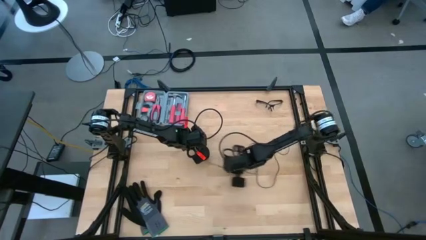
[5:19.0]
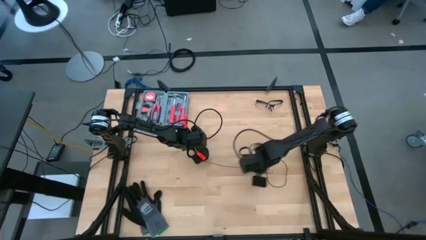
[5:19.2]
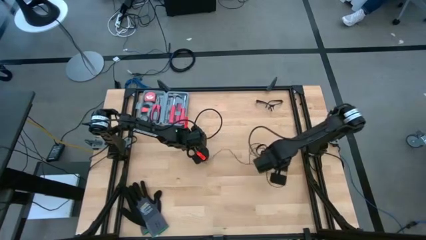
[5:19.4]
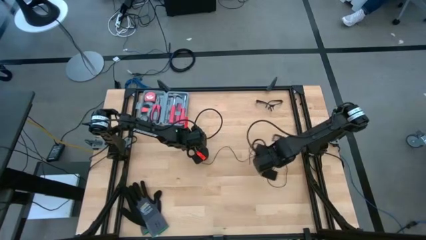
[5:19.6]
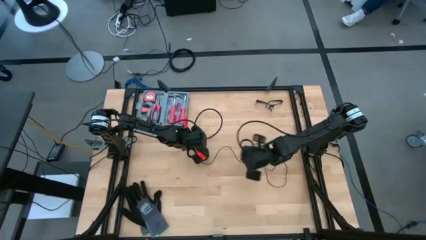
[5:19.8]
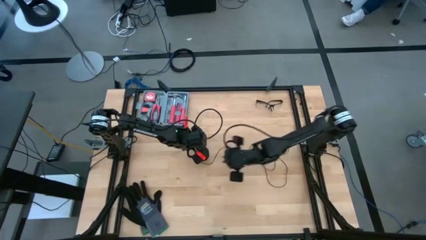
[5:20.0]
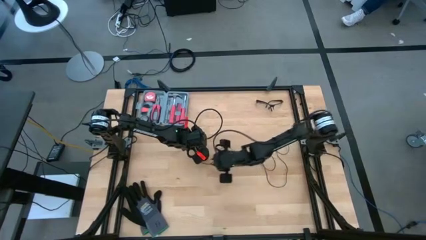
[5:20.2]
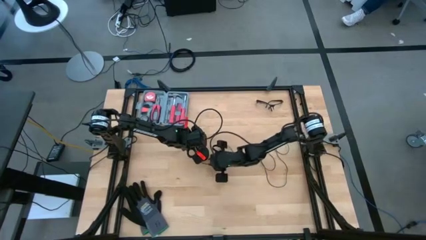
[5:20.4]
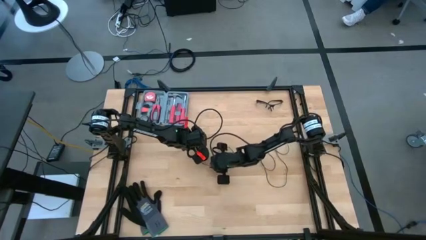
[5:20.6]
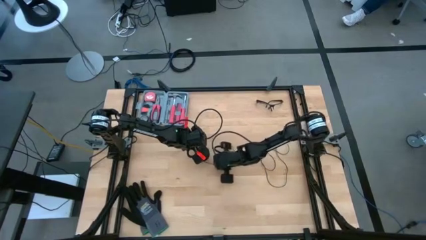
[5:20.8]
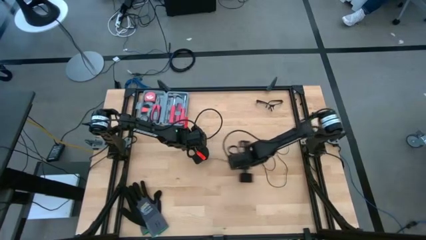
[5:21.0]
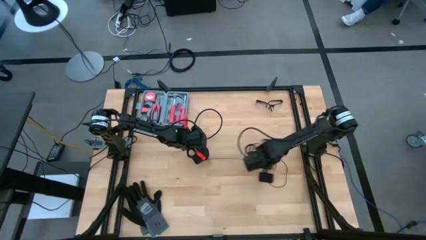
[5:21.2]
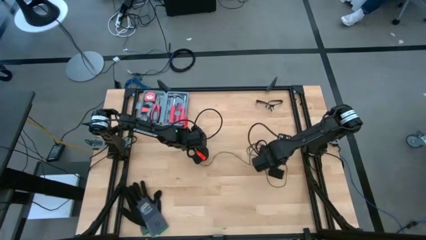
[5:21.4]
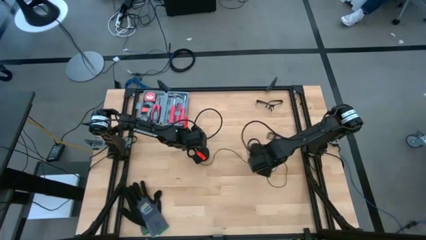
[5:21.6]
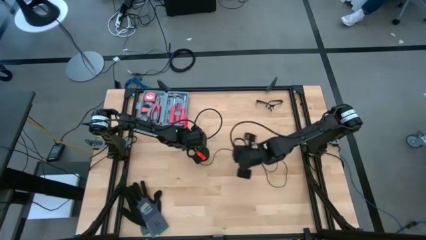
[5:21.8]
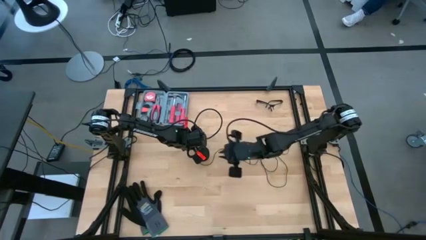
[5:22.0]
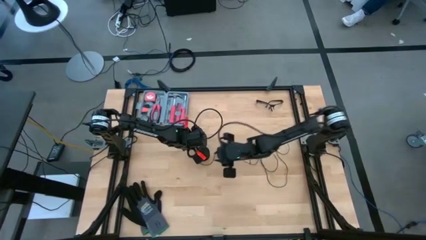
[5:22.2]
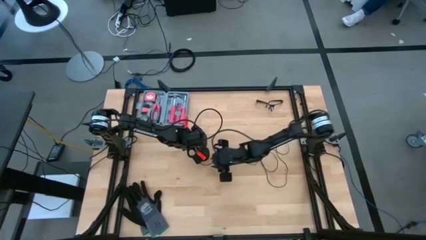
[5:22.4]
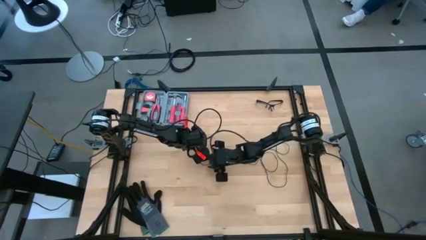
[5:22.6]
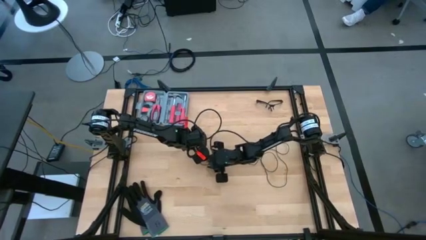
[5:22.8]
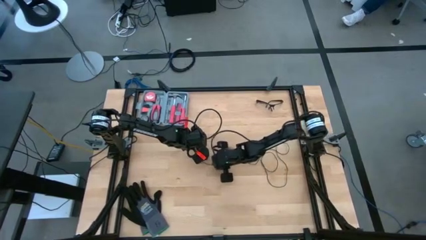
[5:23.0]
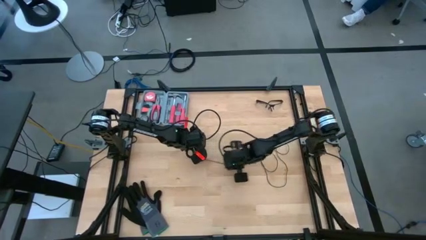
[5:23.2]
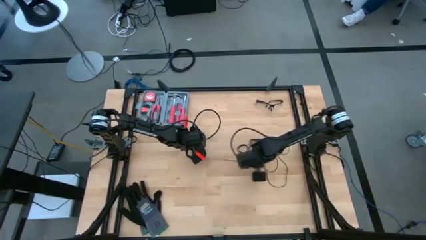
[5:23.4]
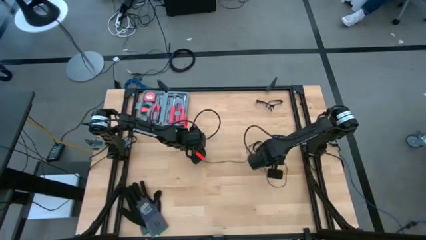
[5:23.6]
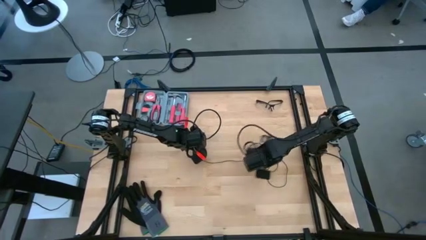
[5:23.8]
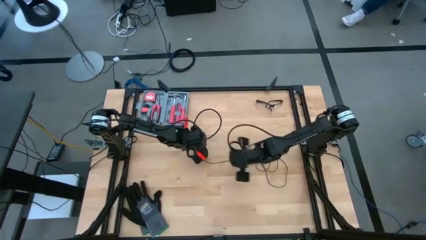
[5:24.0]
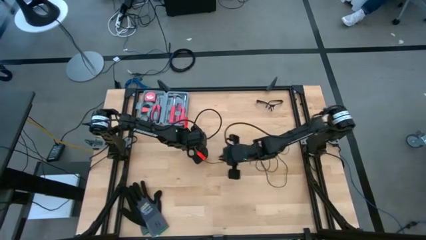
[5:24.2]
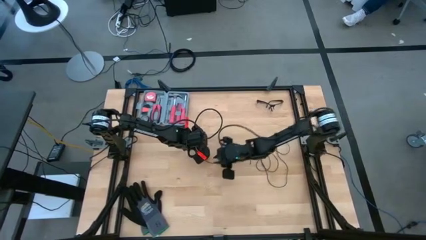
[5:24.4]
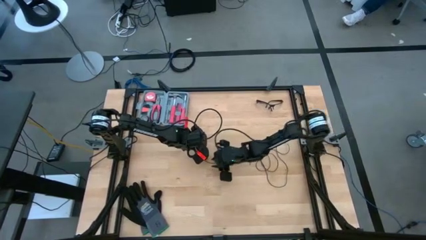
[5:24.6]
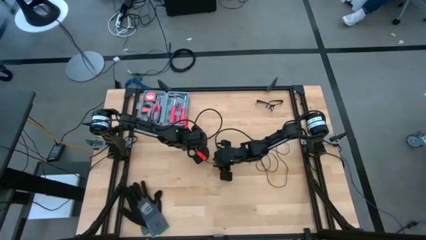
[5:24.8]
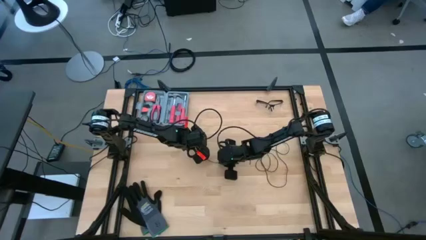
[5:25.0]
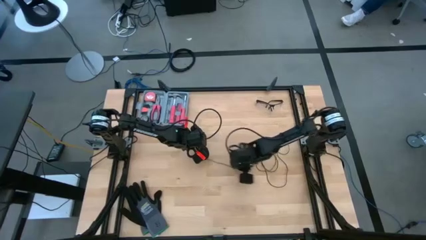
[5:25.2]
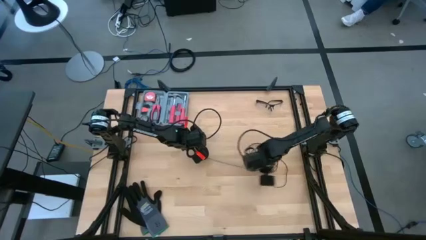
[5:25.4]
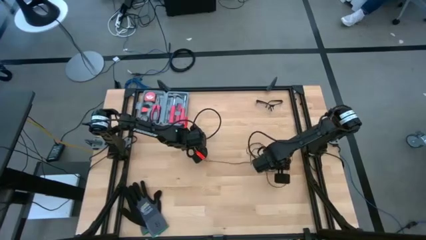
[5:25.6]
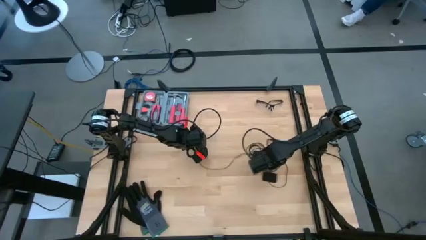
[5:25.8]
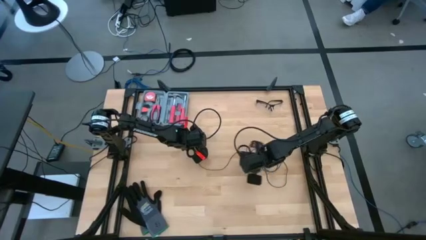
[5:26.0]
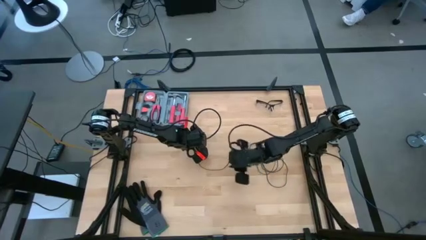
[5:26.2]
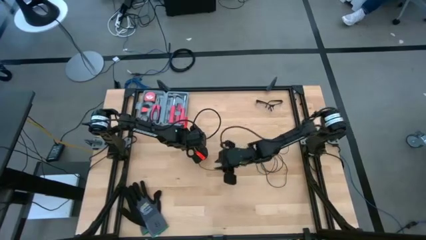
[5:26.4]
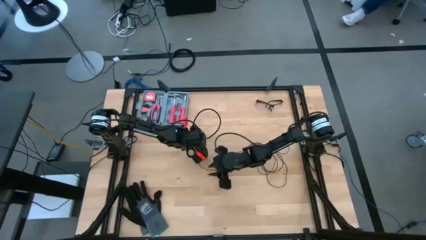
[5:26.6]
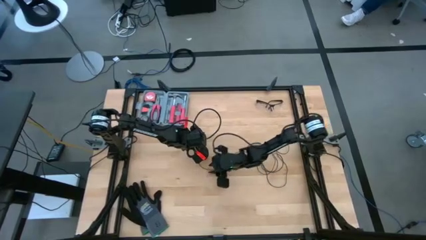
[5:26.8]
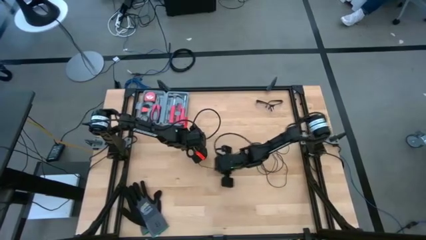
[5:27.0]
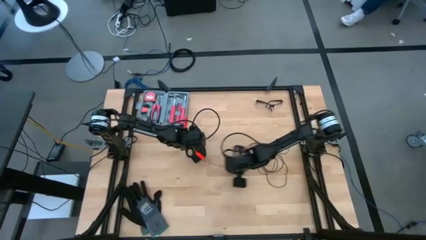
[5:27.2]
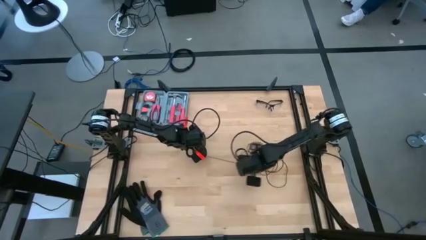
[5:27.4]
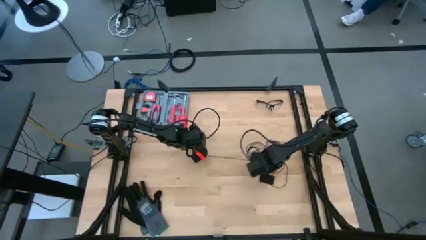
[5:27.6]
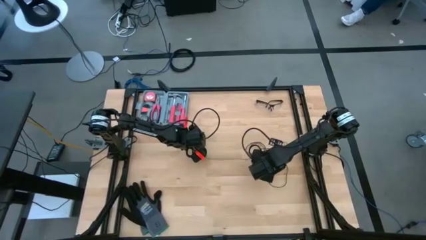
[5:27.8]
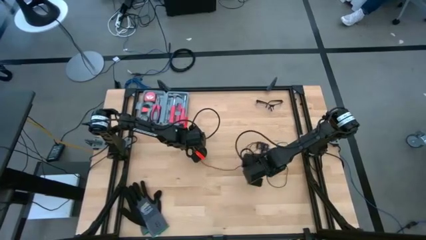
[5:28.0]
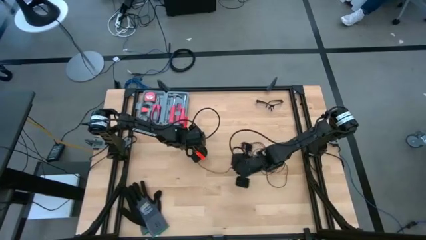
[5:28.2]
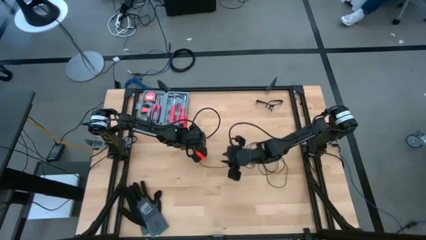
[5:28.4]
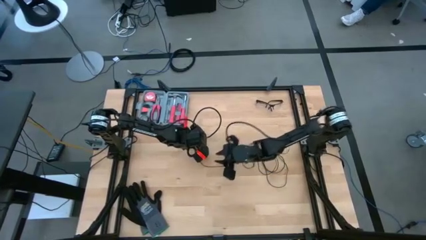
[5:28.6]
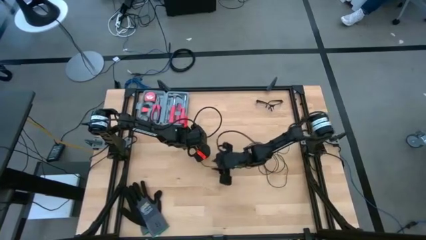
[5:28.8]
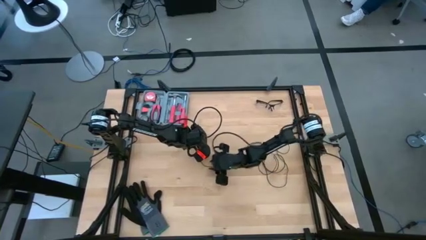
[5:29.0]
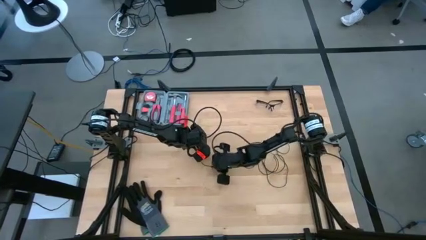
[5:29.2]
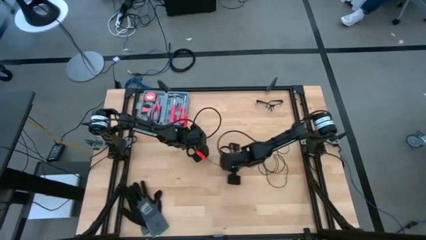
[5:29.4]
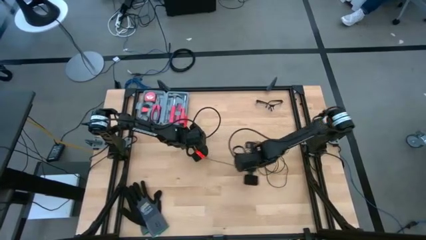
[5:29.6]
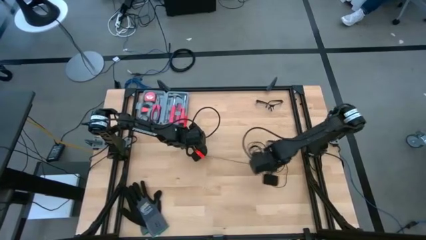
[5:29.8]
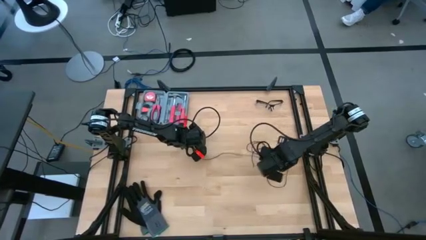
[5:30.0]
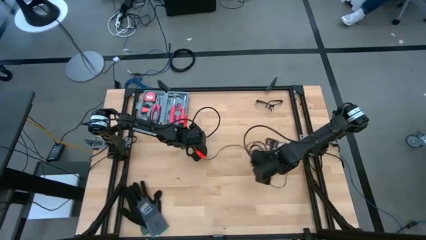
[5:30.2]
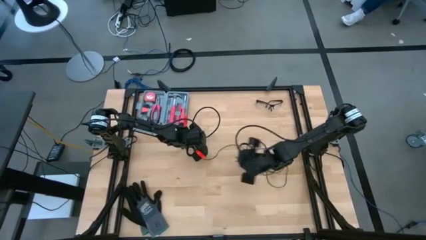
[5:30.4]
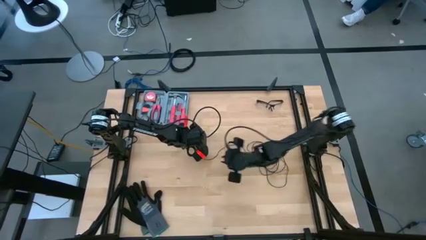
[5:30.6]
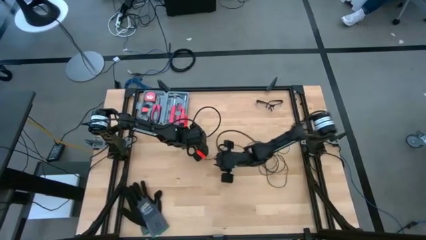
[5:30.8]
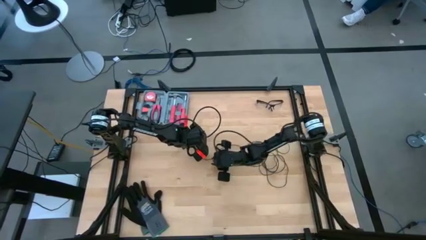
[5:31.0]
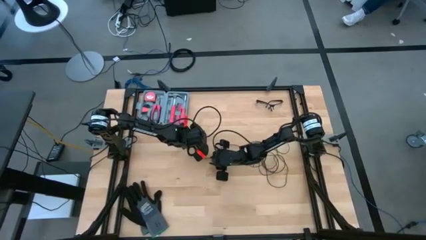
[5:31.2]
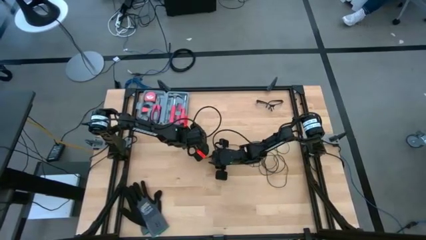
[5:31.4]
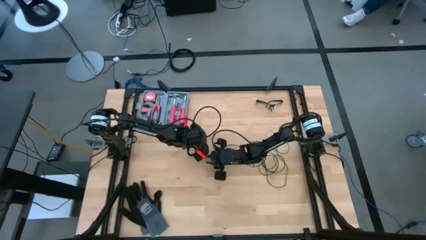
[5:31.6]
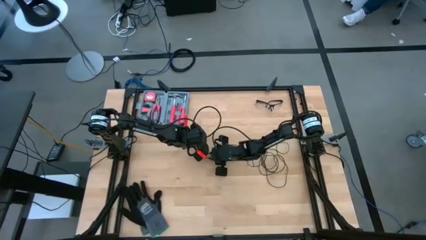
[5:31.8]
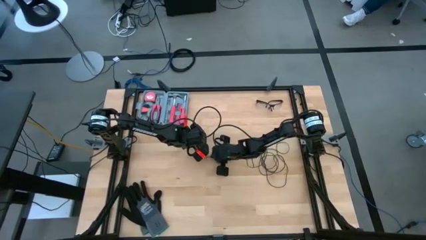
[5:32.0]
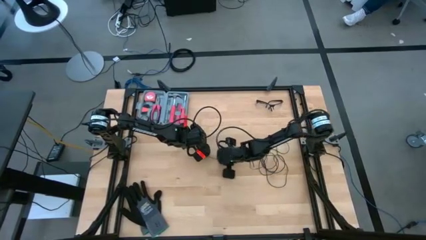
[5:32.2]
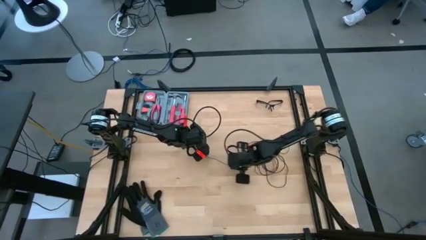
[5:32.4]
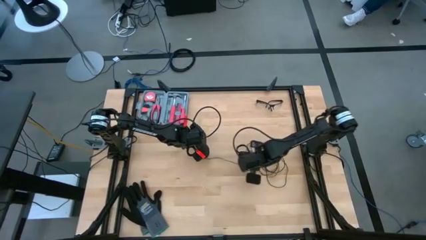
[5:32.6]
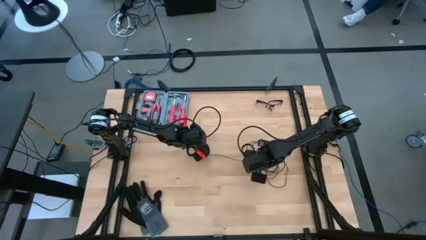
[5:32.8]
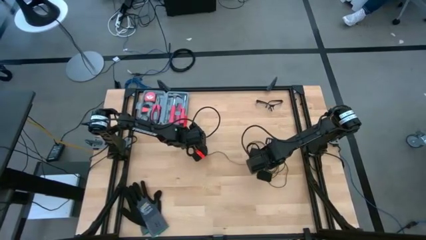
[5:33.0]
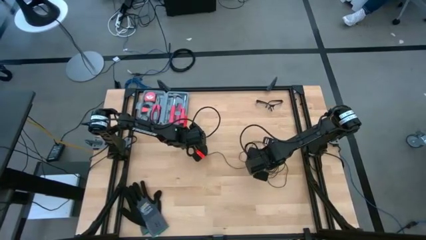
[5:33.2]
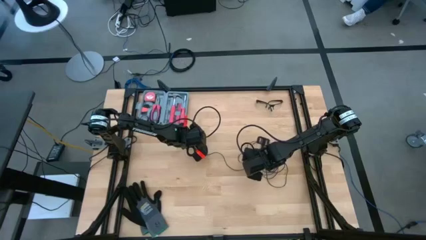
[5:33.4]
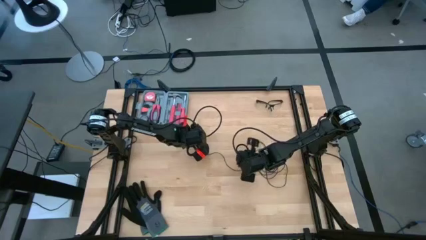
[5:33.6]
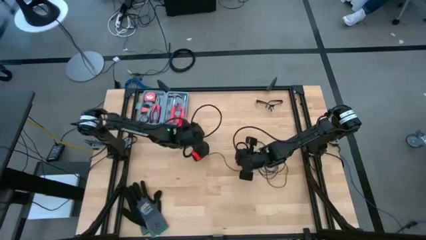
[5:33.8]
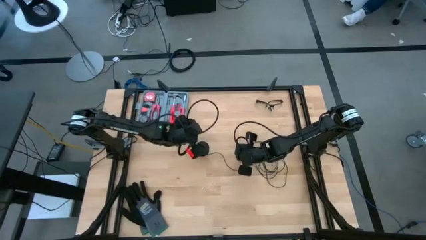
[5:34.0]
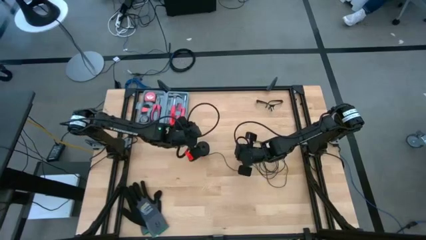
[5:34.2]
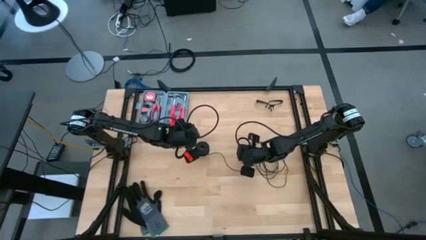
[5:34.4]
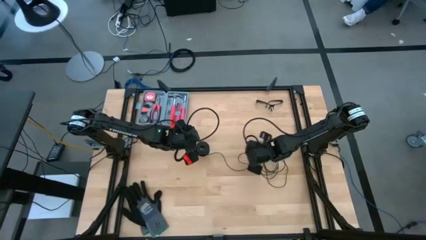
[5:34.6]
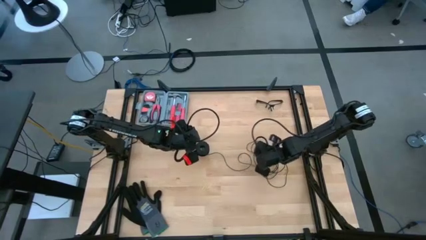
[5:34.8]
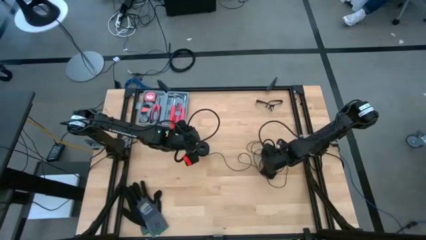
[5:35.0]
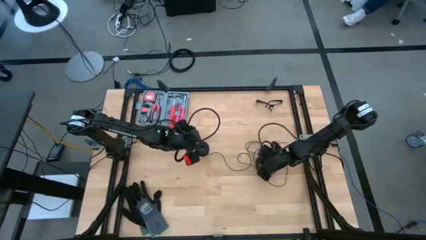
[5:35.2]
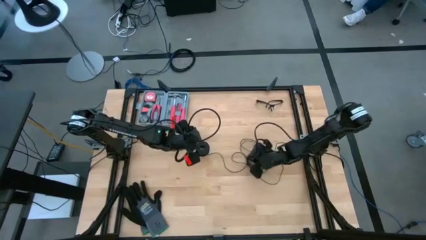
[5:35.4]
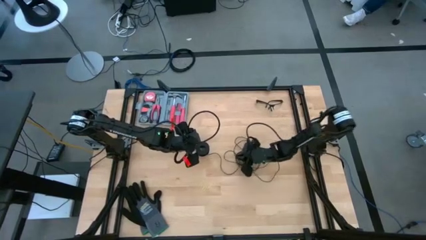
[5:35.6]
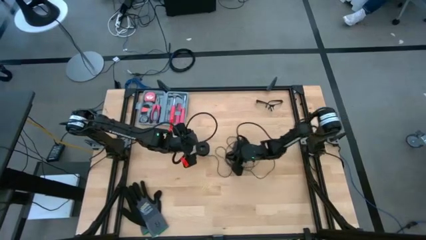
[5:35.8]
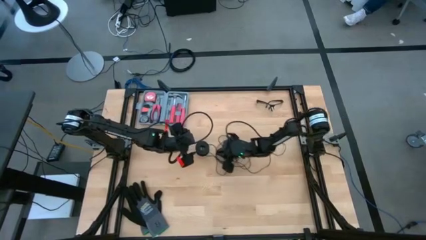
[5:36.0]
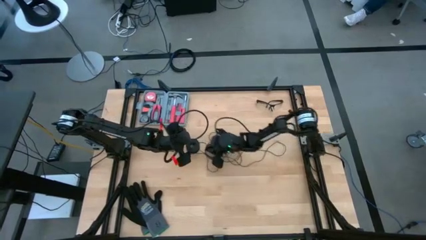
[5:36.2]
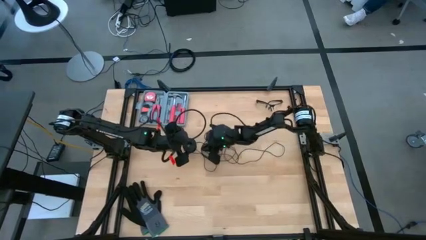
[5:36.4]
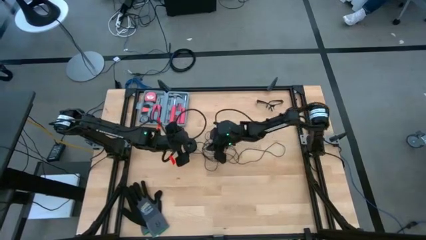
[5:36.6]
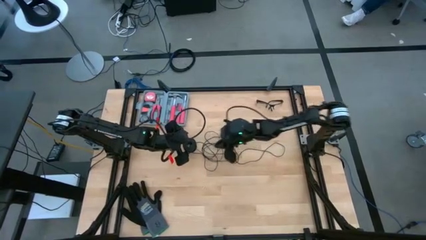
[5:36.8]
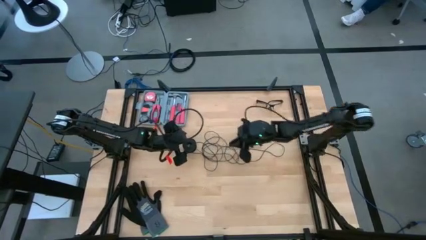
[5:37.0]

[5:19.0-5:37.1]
Task: Coil cords
Uncoil the black wire from the black spool
